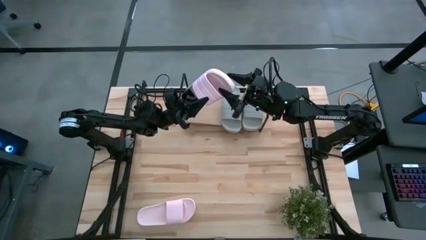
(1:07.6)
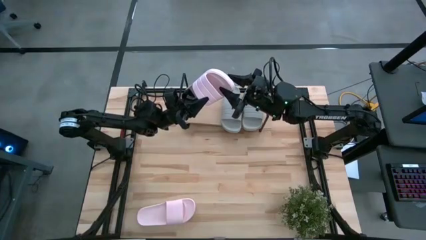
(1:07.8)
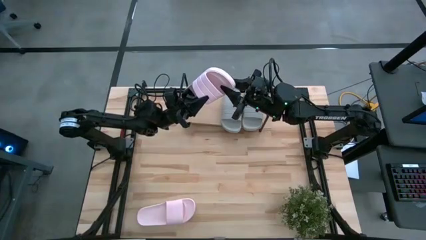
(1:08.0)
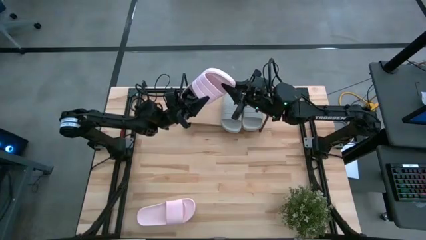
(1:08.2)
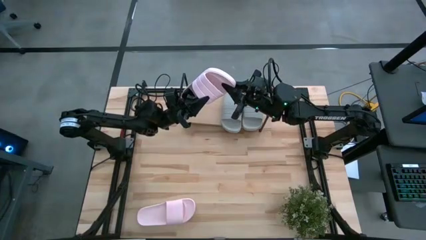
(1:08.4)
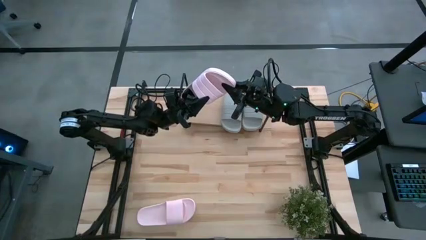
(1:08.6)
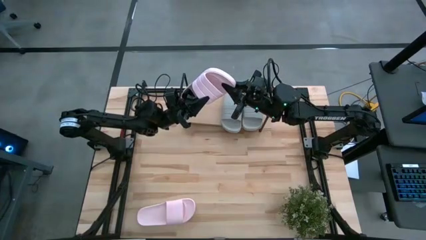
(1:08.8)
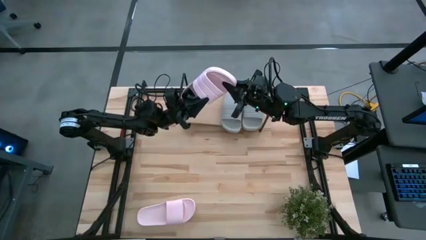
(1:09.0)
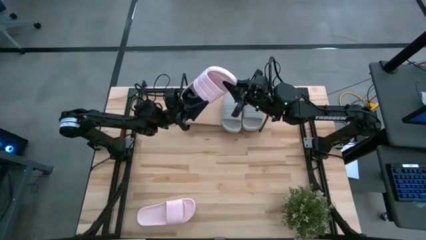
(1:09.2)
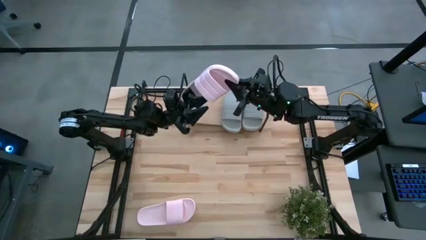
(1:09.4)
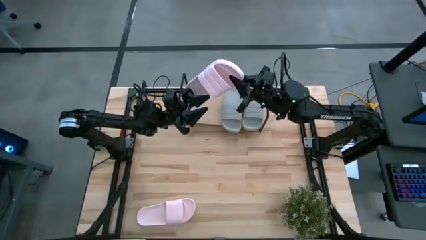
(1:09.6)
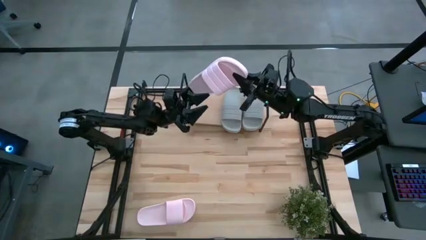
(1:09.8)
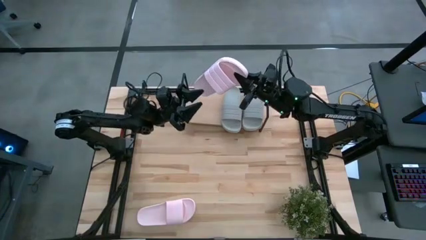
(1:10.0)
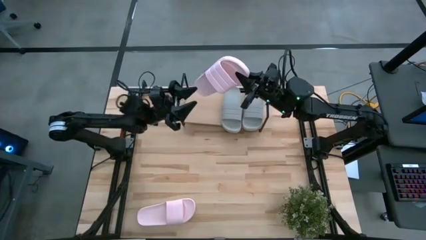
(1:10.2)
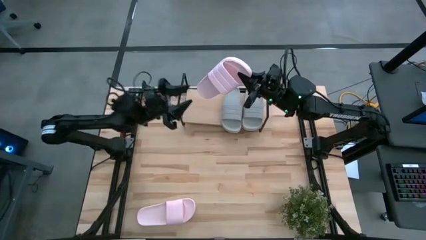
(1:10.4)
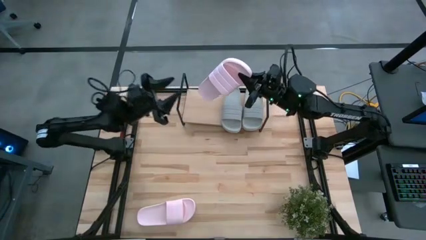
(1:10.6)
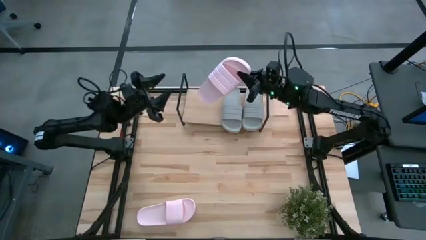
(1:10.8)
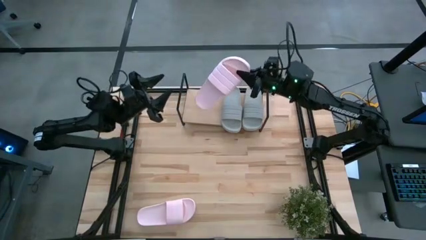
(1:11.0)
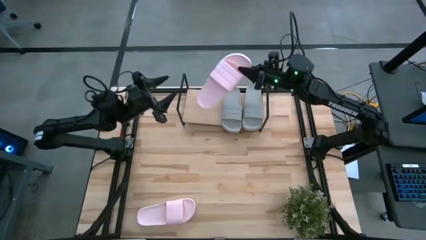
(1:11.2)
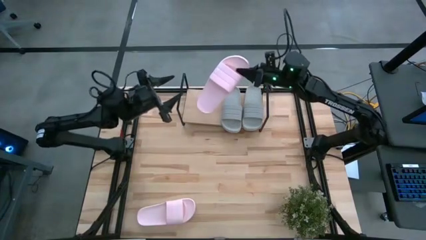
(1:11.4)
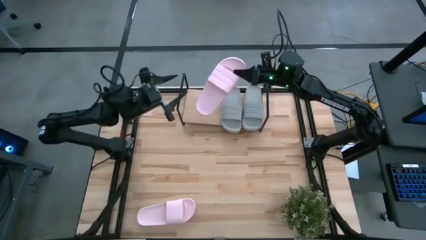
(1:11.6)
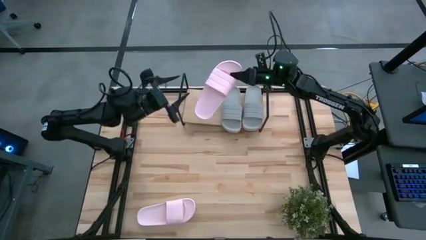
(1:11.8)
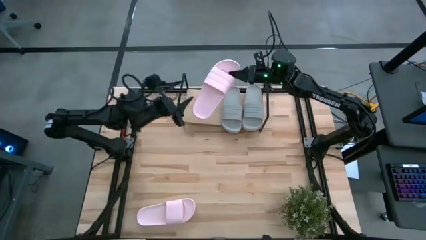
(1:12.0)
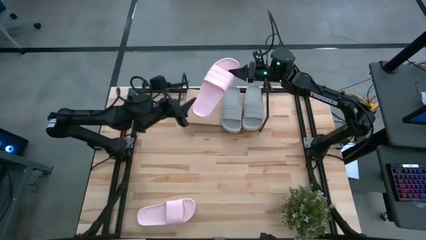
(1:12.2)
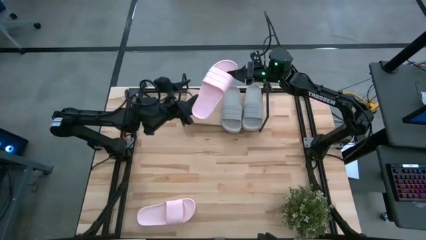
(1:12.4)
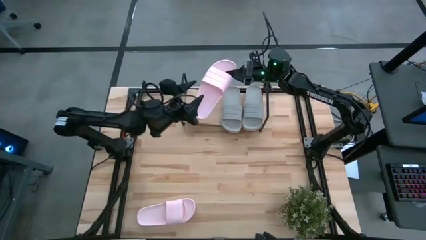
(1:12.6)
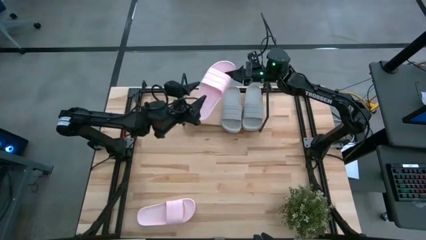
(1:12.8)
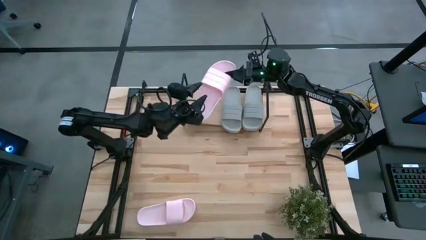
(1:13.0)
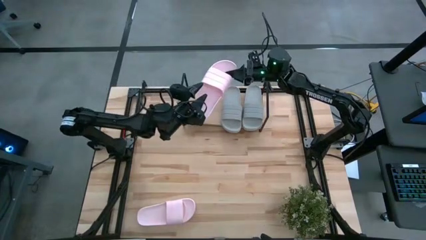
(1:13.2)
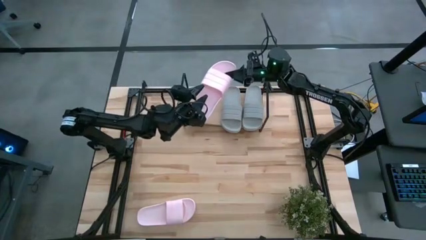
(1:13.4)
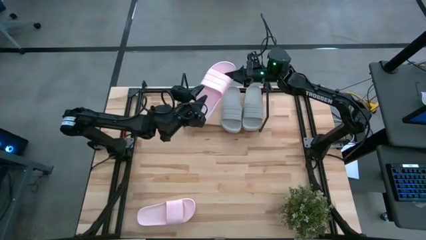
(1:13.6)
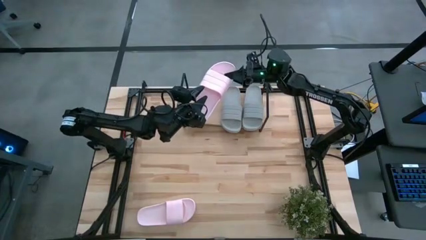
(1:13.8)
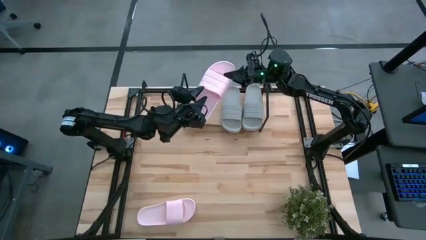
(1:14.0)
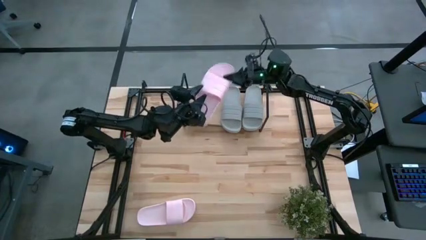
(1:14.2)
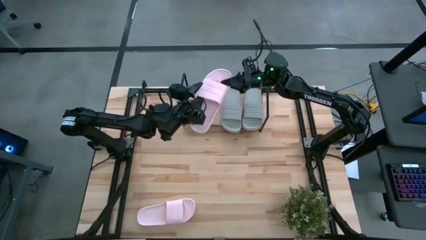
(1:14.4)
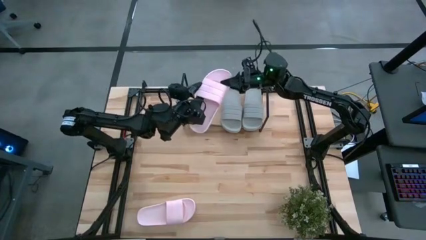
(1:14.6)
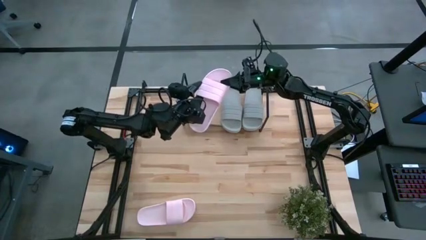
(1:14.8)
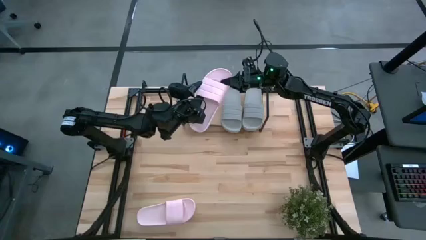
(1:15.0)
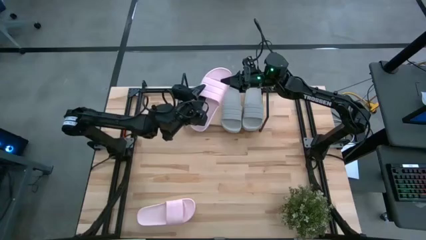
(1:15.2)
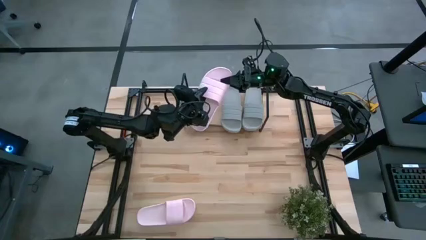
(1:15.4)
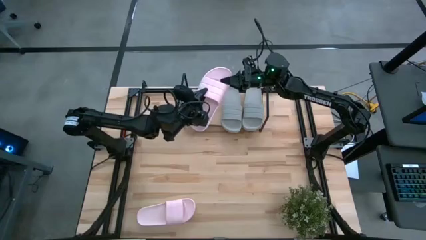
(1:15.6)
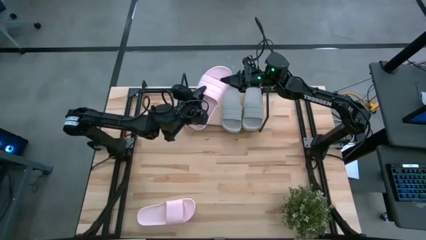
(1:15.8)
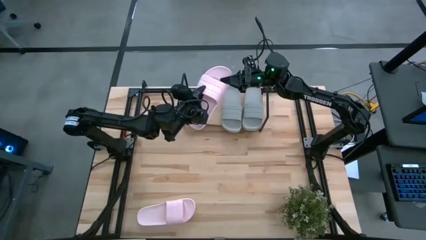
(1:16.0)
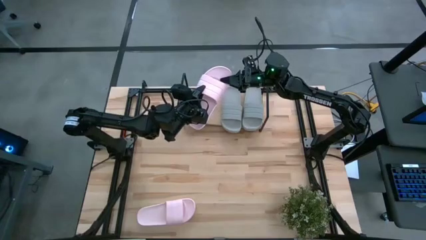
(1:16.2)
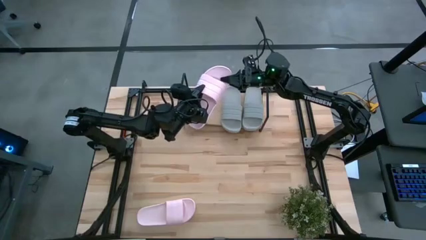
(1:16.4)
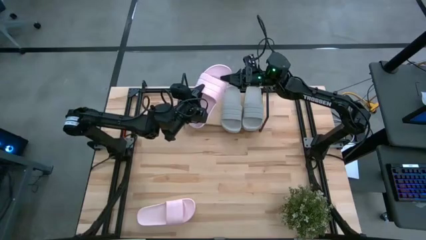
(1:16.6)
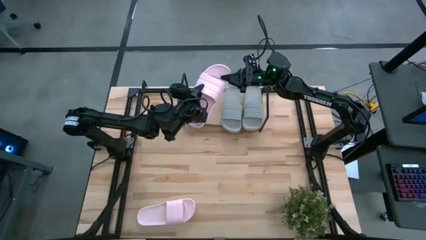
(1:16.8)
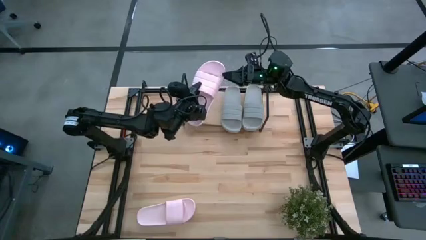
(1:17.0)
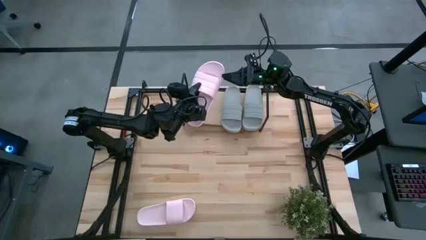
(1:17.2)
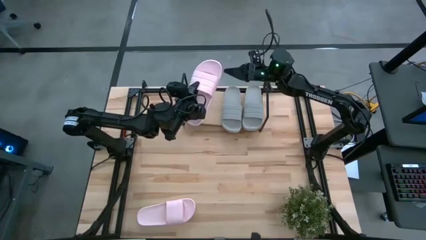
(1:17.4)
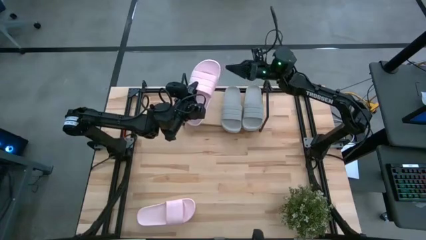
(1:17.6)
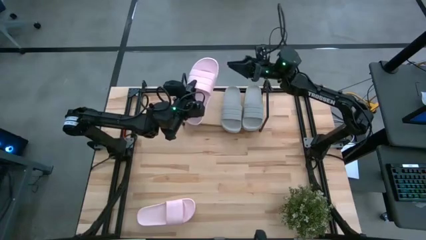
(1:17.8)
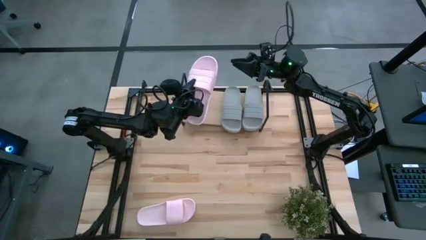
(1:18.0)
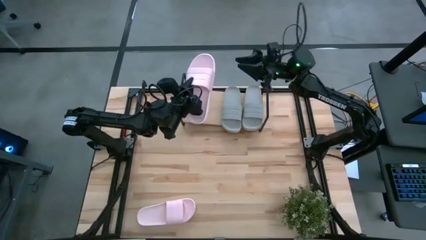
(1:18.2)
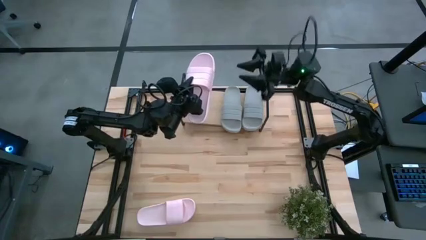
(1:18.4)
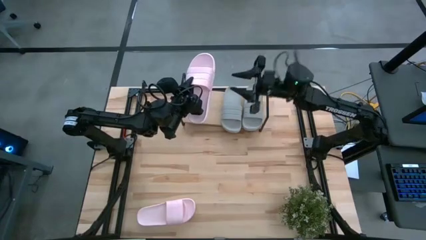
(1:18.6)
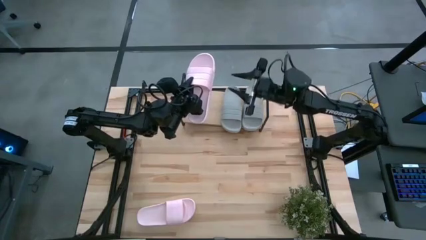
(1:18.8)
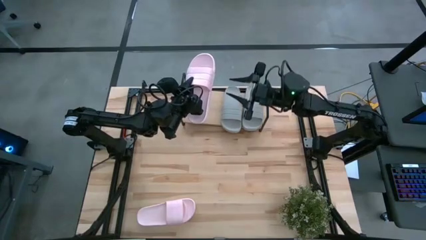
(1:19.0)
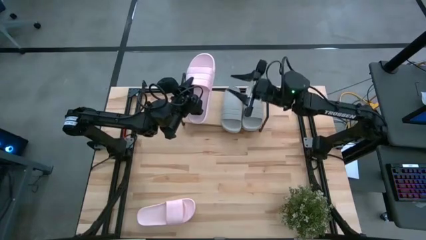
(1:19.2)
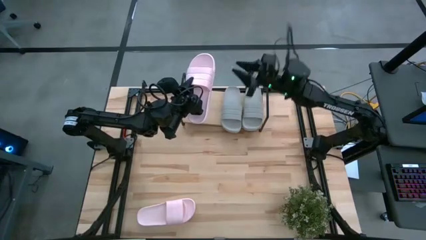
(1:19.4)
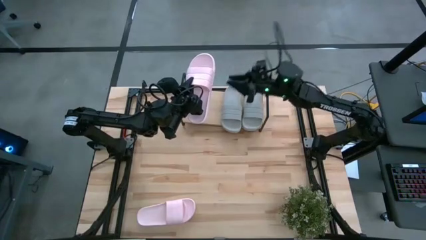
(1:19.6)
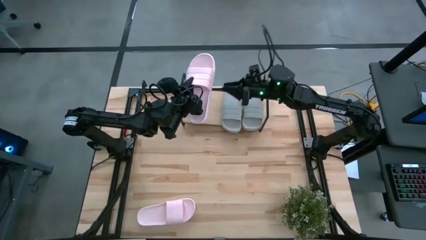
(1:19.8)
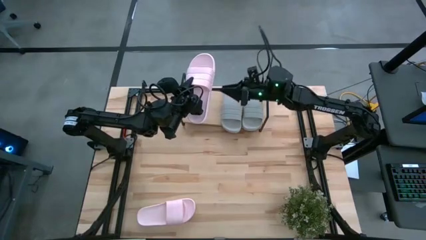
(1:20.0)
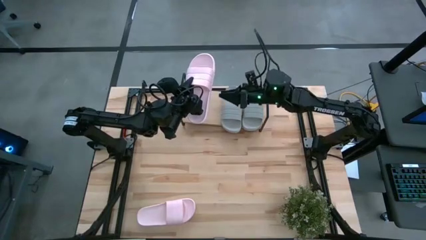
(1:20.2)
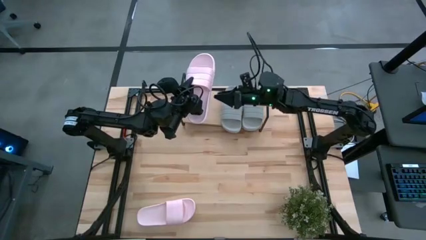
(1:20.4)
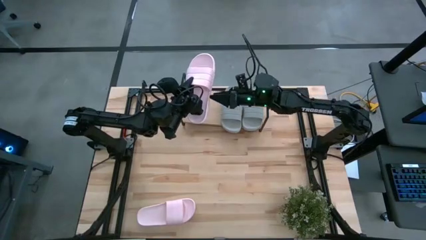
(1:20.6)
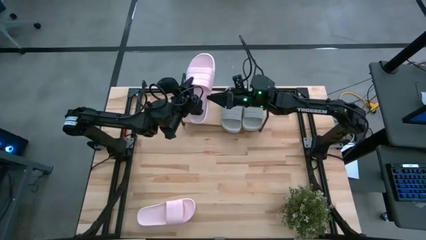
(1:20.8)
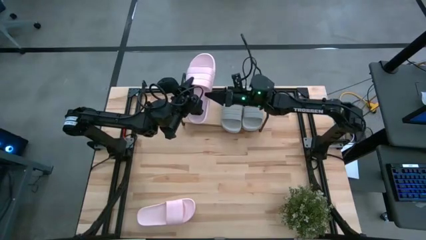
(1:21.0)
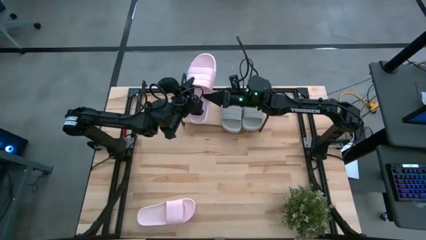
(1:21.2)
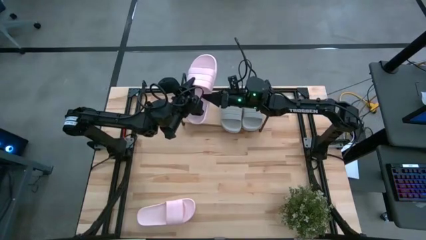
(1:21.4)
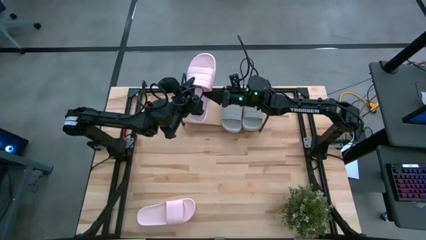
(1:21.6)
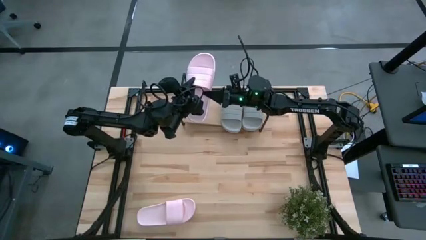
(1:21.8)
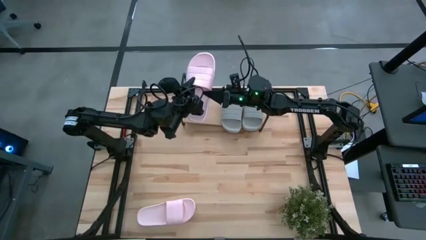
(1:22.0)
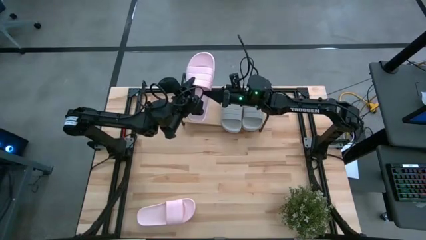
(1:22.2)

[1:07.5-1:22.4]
Task: Pick and place slides into the shelf
Put the top pink slipper on the shelf

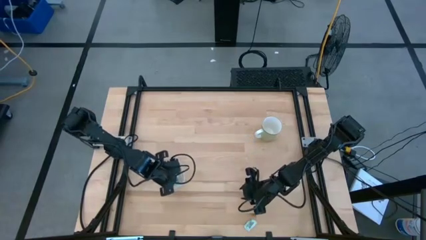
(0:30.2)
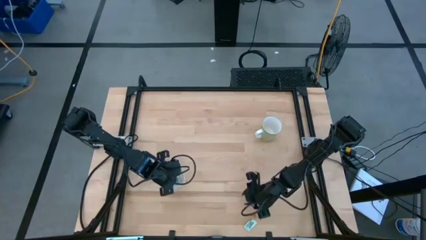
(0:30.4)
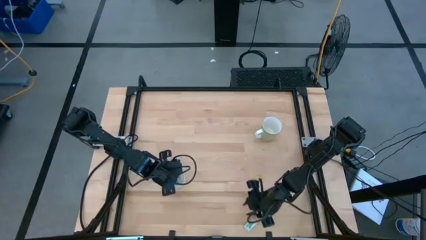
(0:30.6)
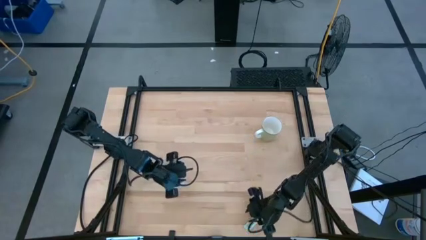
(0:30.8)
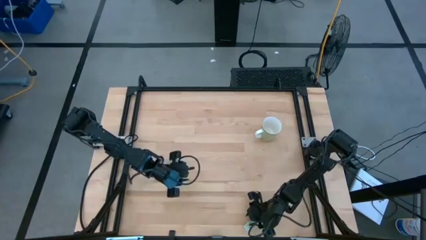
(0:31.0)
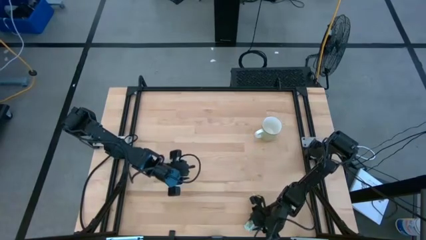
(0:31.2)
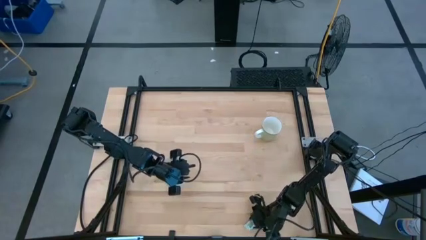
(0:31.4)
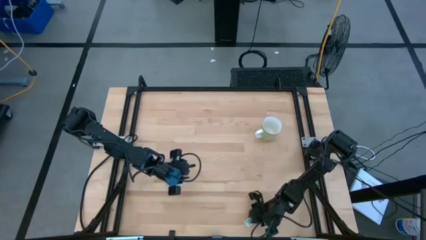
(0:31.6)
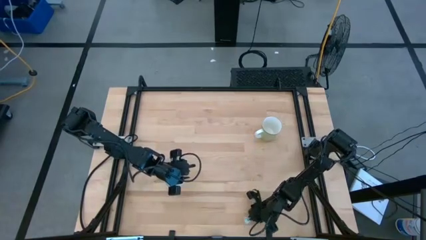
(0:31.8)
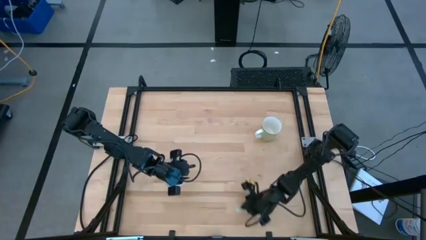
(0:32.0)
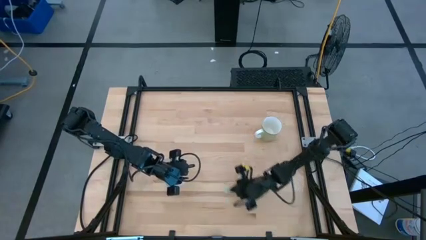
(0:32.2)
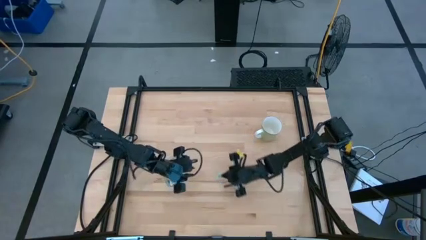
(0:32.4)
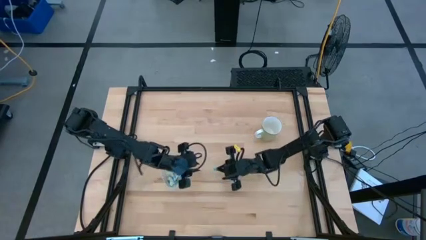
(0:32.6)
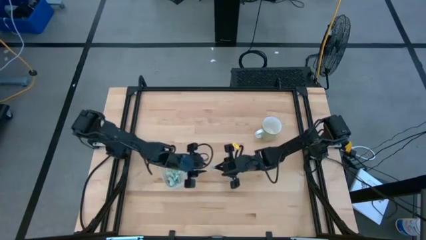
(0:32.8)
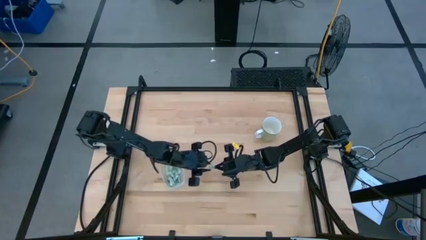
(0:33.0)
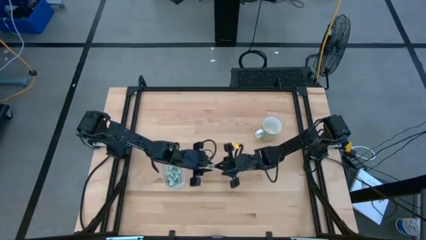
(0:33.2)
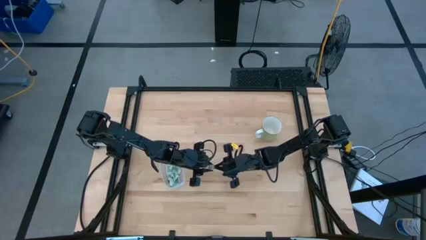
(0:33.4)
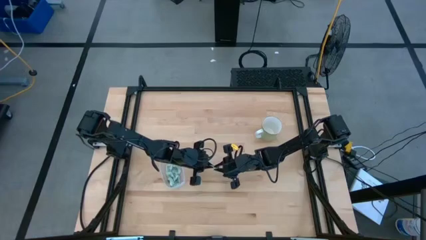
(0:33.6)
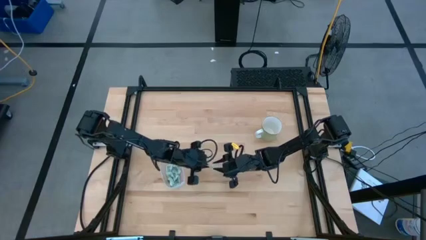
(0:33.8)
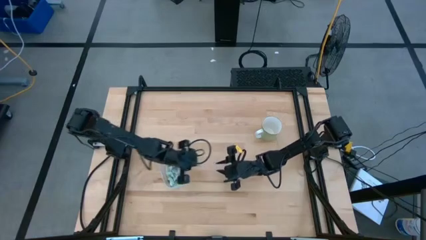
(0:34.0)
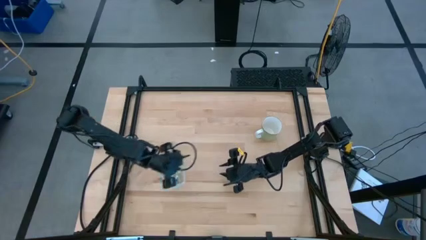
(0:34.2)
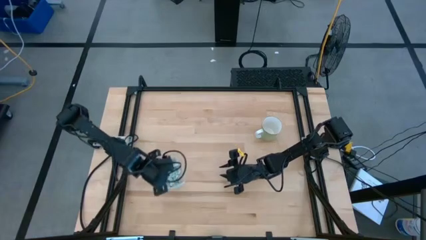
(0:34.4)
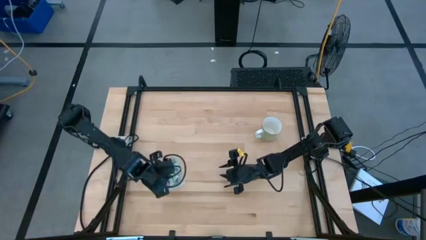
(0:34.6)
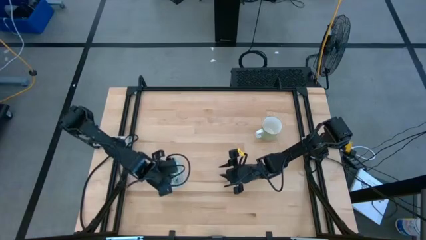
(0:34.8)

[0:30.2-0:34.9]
Task: Pick and place Stevia / Truvia into bins
Put the green stevia packet into the transparent bin
